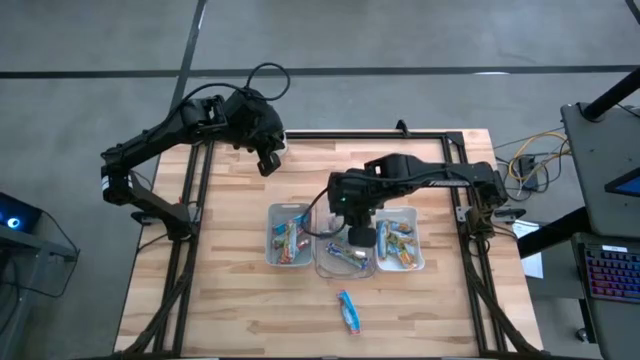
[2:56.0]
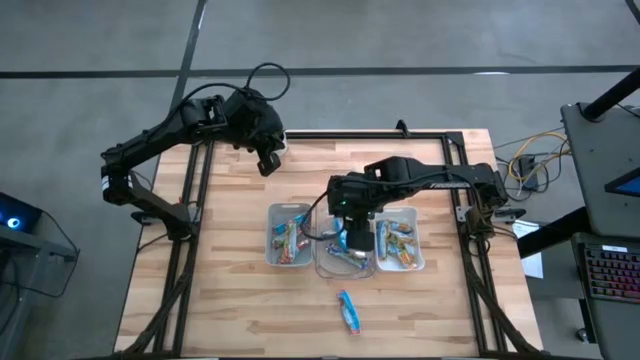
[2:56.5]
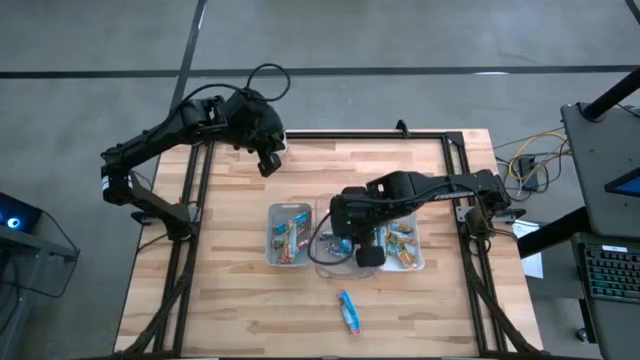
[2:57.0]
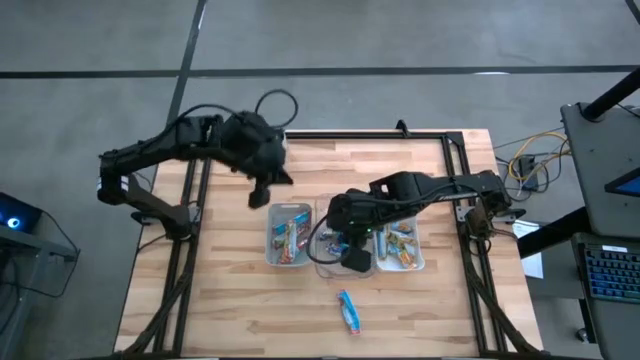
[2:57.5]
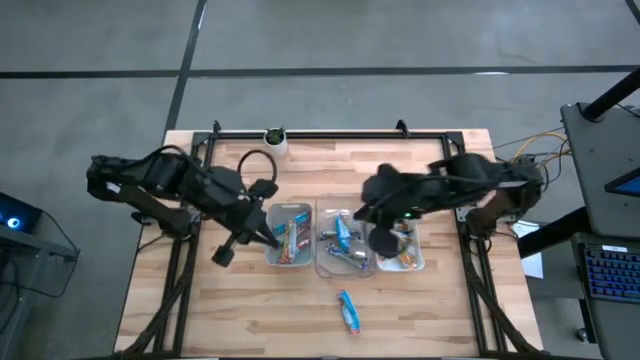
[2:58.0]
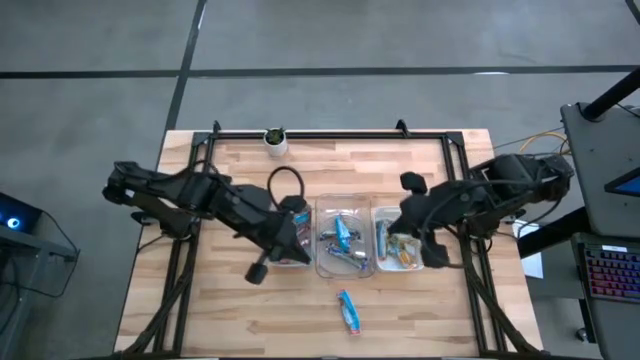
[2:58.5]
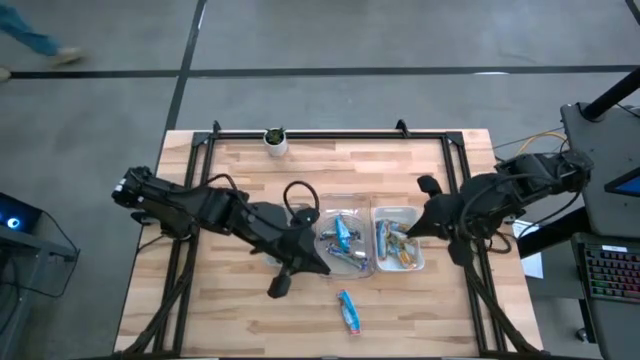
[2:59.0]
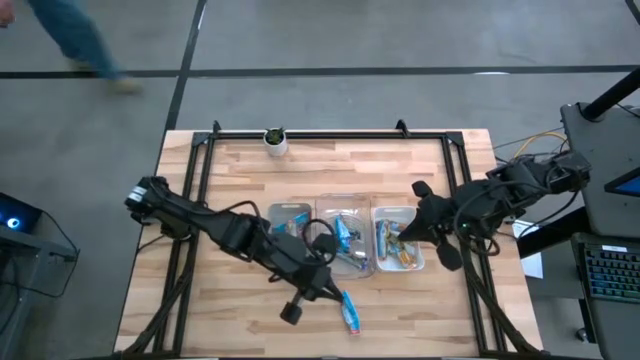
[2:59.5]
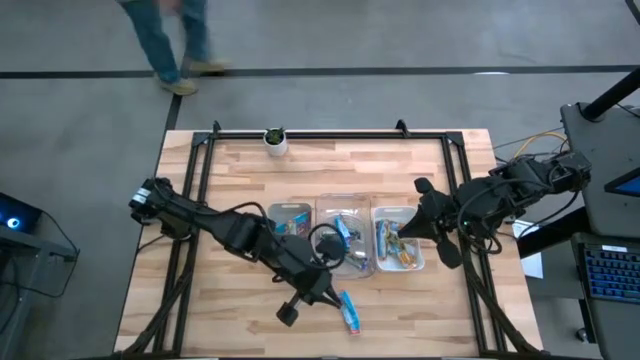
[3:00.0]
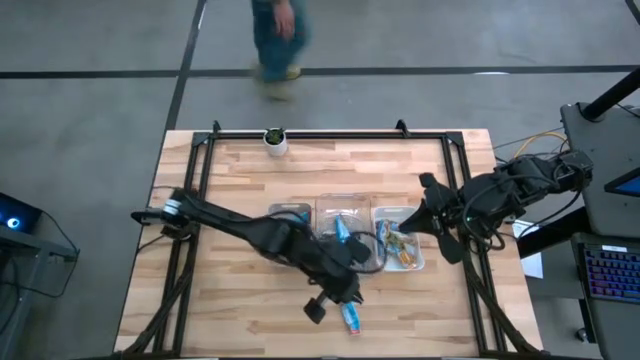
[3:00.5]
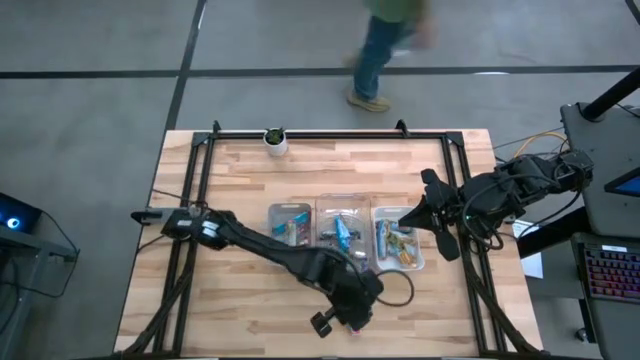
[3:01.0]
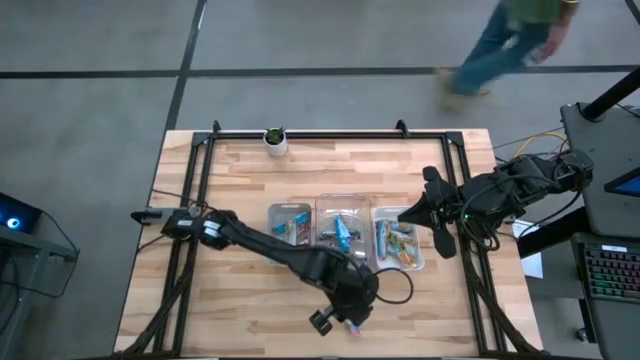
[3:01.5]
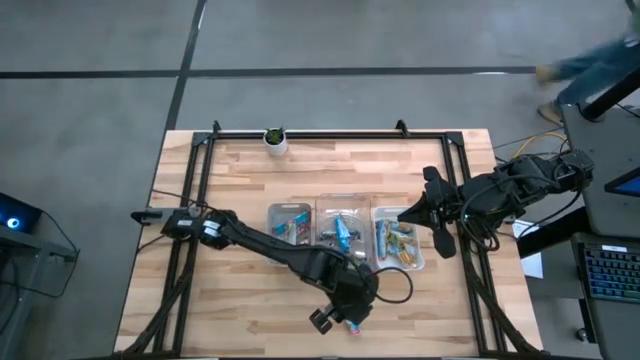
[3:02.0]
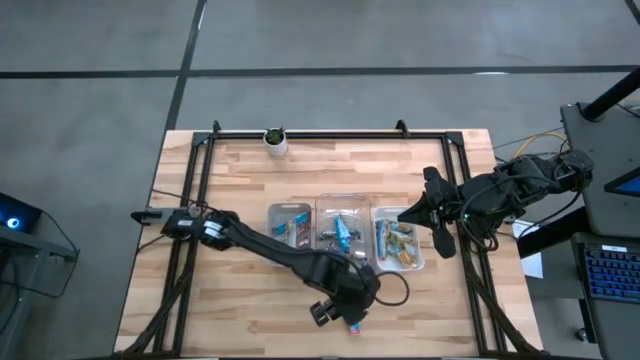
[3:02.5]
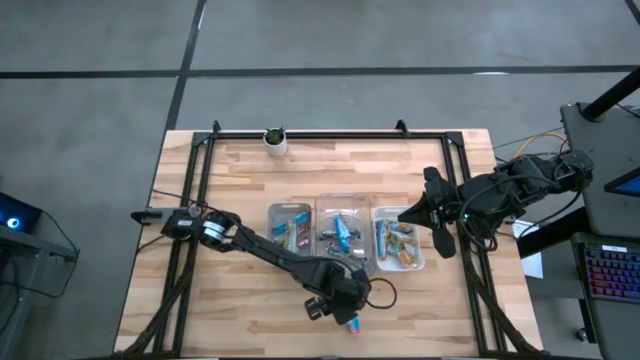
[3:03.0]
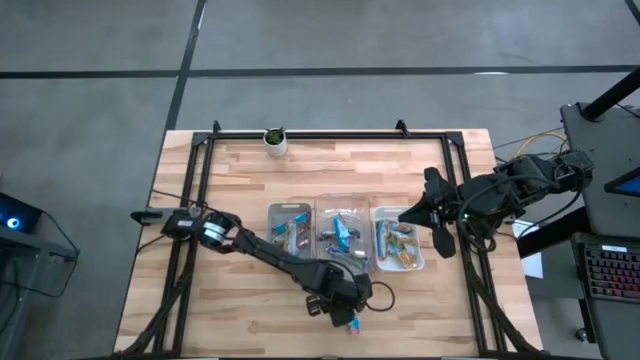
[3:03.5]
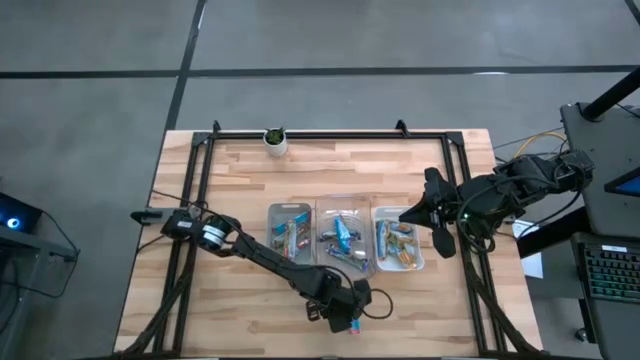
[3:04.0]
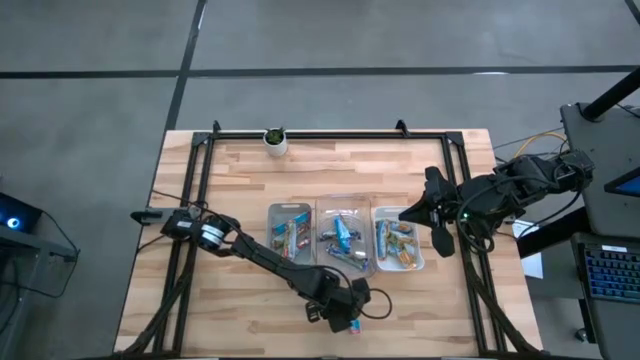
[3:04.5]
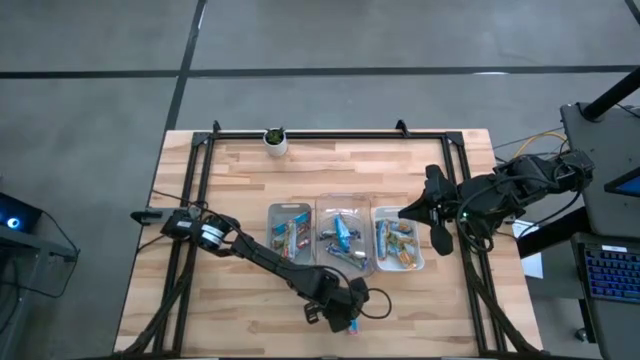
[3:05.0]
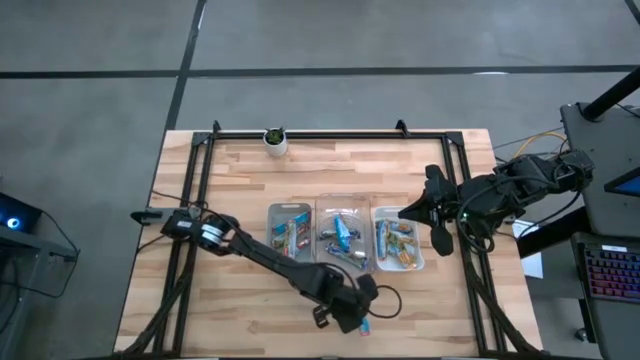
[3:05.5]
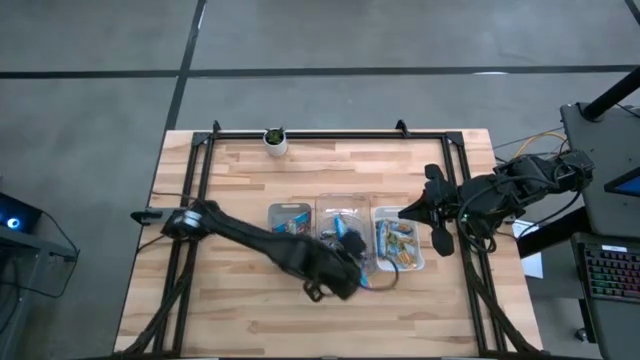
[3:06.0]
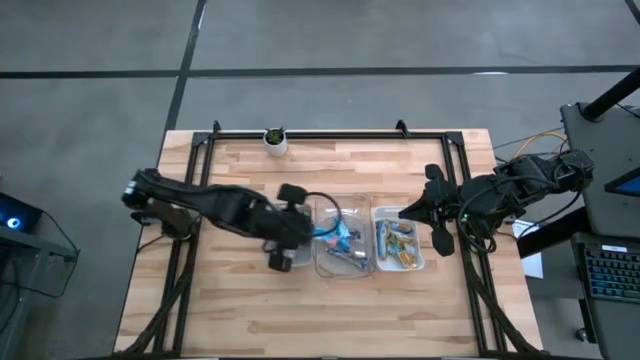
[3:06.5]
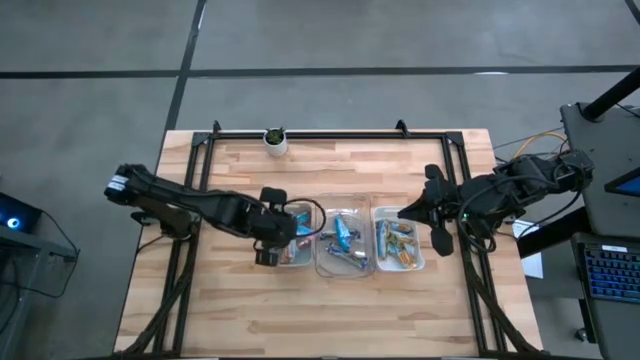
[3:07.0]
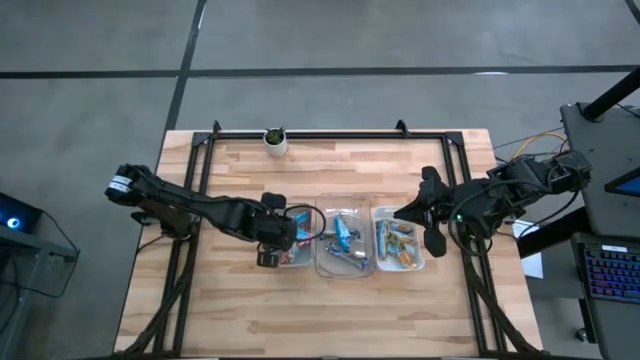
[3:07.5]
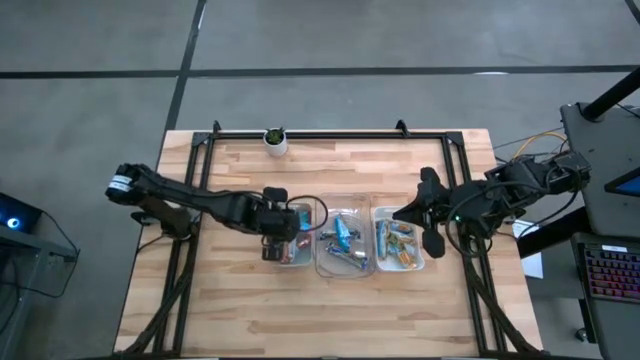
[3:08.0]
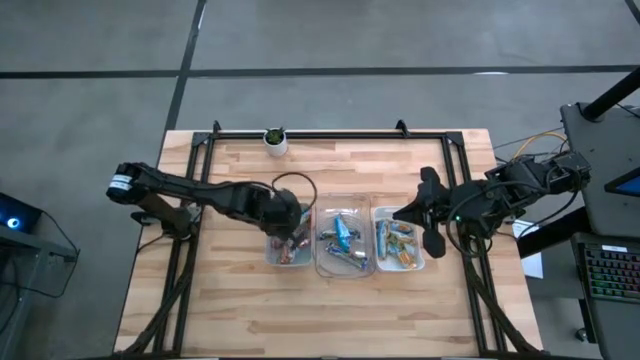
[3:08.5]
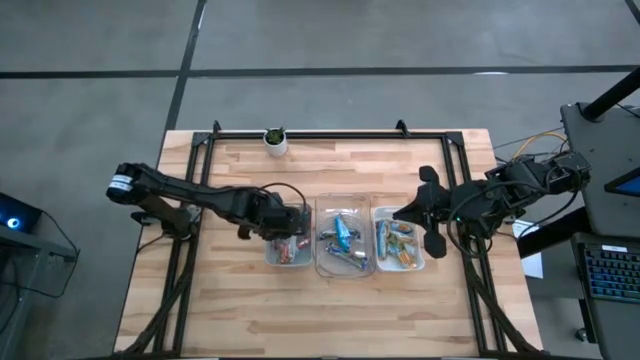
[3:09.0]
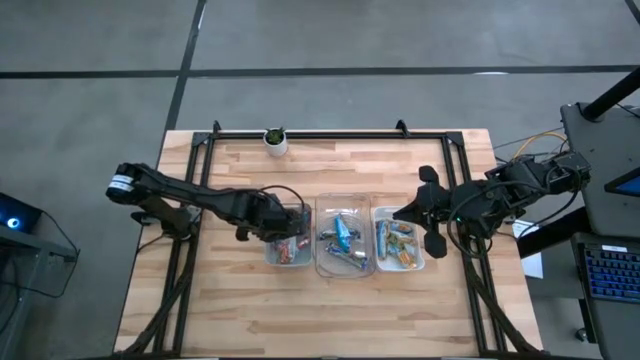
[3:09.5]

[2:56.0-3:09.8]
Task: Pick and place Granola Bars by type
Put the red granola bar into the gray bin

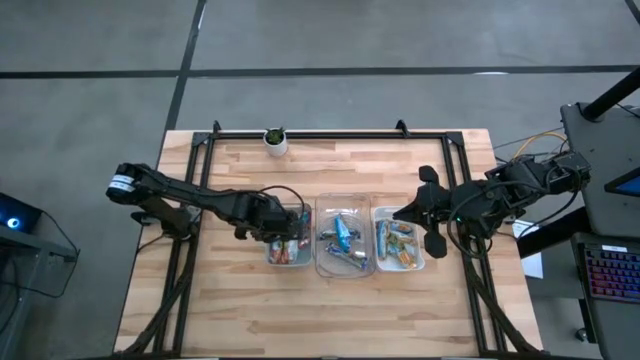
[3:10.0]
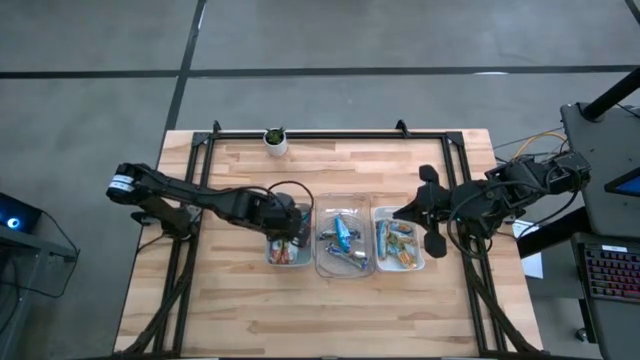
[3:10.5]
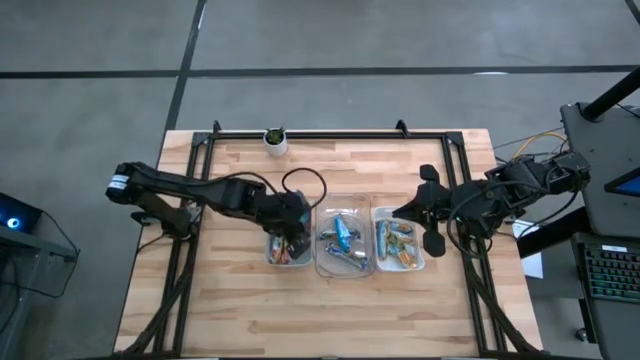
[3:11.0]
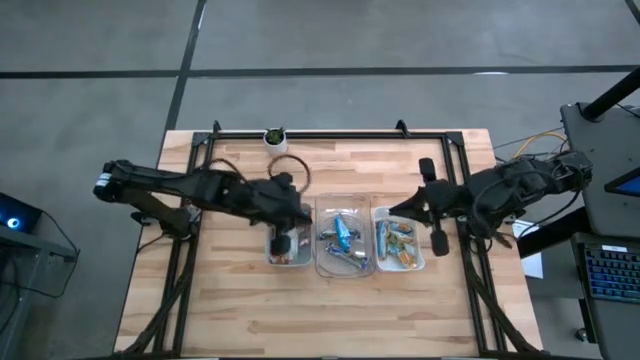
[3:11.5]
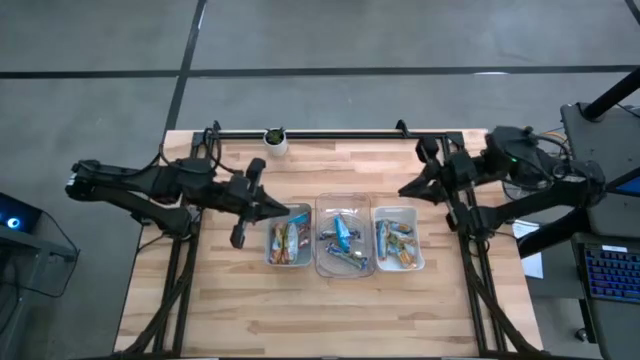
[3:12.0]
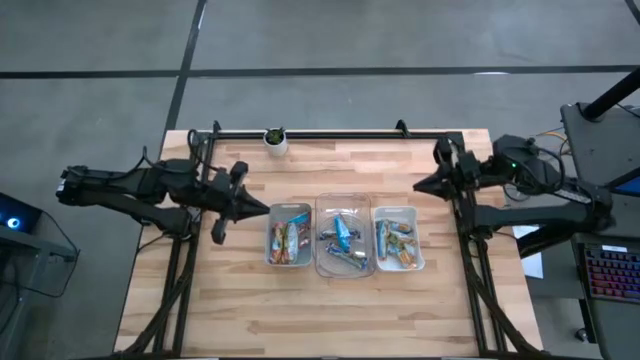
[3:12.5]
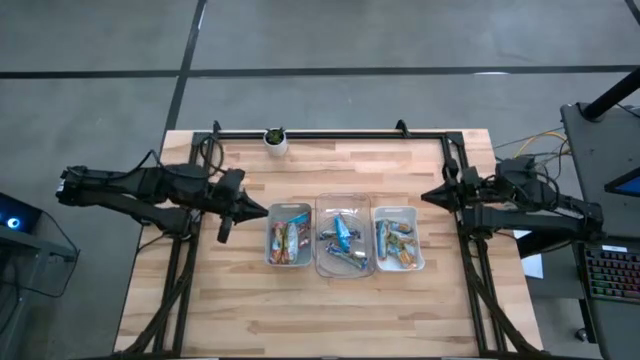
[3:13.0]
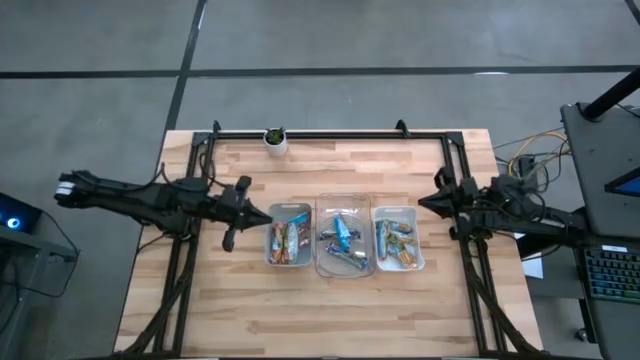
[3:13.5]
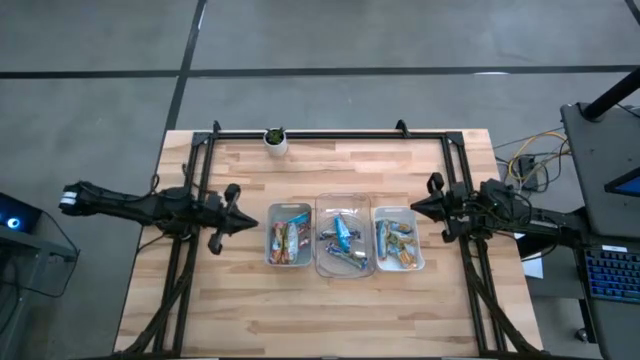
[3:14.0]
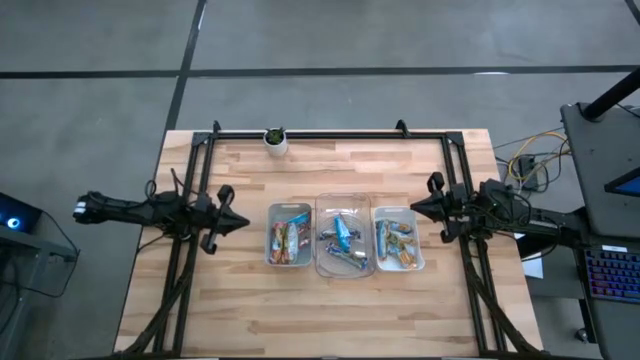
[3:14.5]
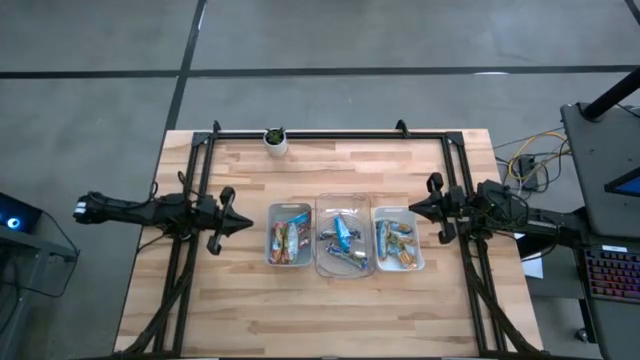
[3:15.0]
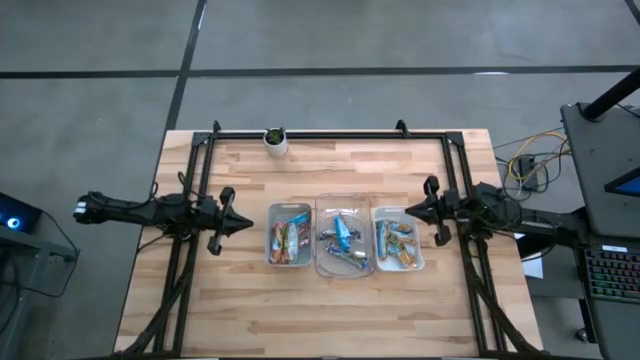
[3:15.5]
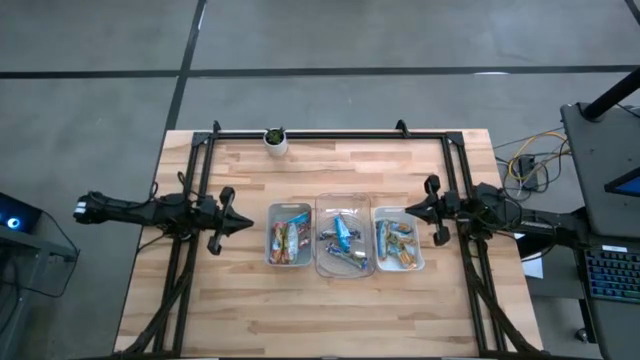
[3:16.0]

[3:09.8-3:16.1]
Return to Home Position

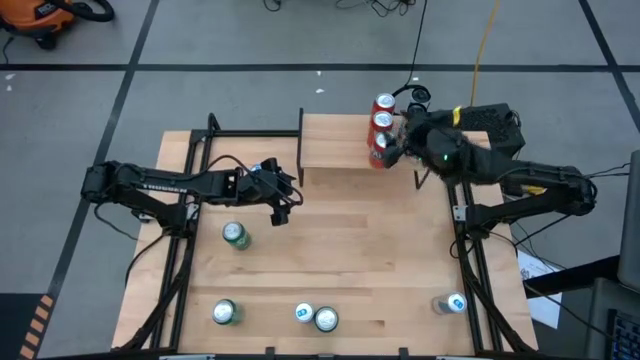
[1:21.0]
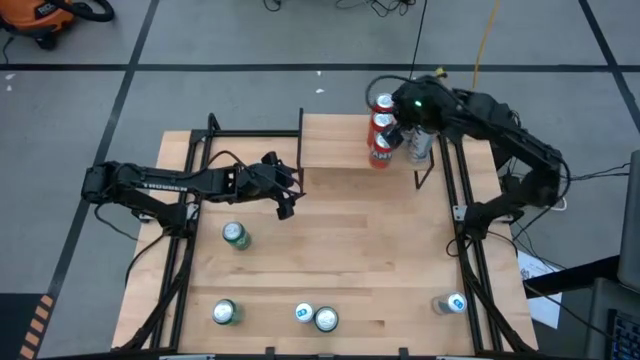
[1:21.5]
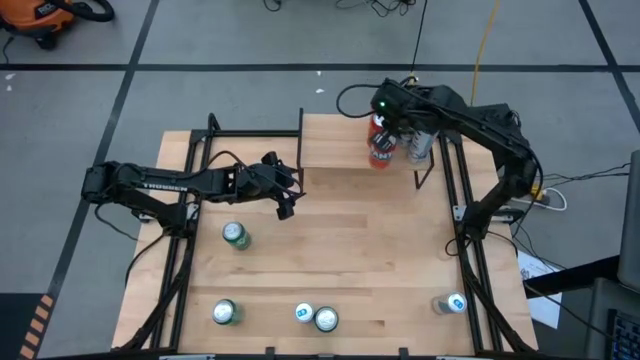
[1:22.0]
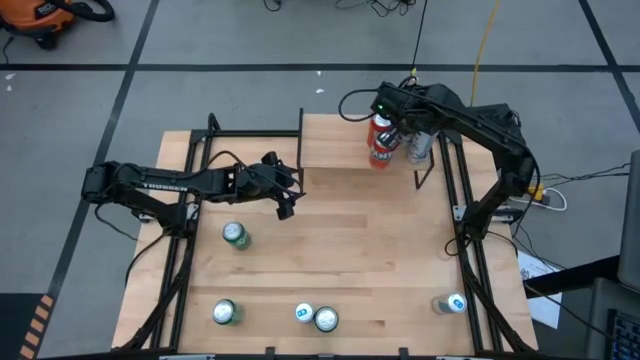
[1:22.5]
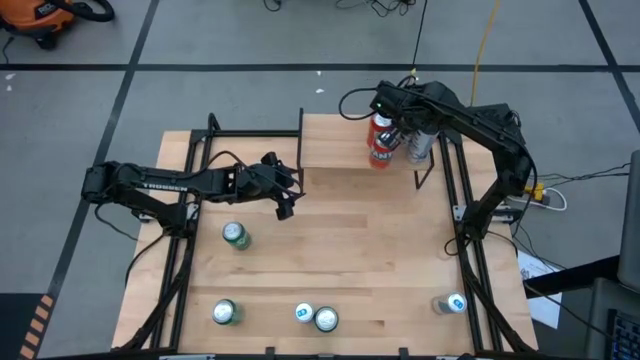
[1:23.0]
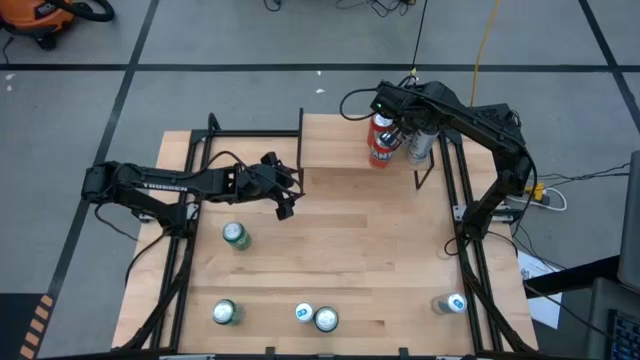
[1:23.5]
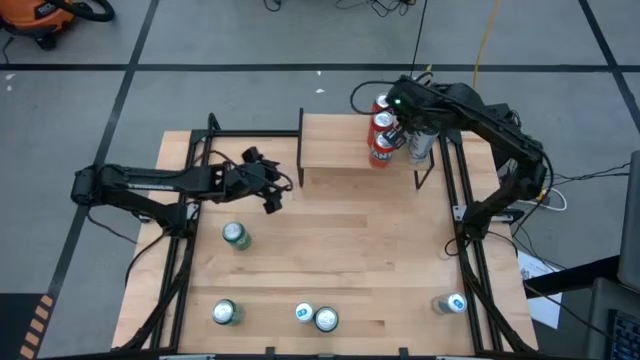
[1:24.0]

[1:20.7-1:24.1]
Task: Place canned beverage on shelf
Adjust the white blue soda can on the shelf
